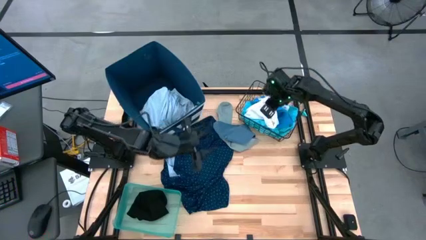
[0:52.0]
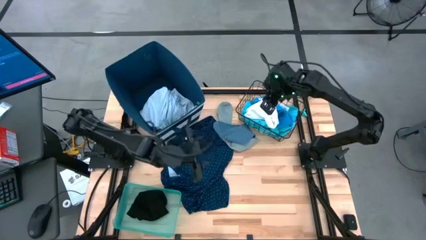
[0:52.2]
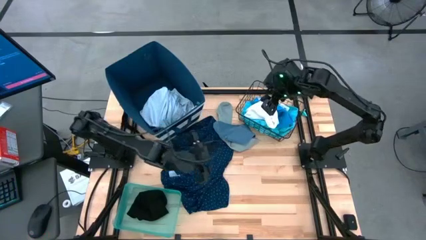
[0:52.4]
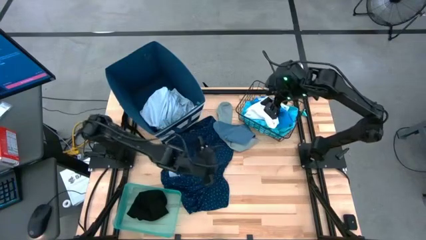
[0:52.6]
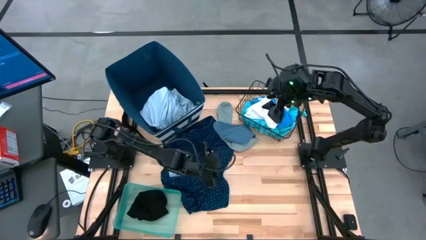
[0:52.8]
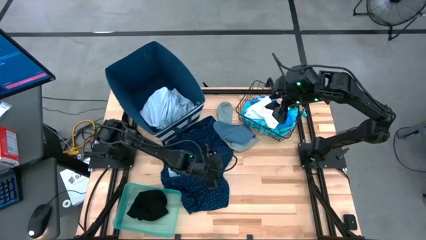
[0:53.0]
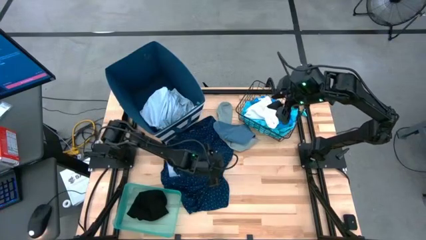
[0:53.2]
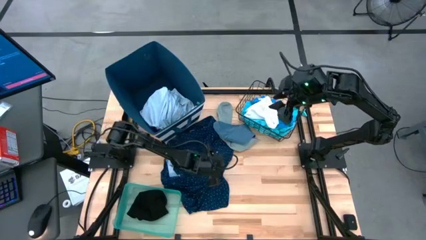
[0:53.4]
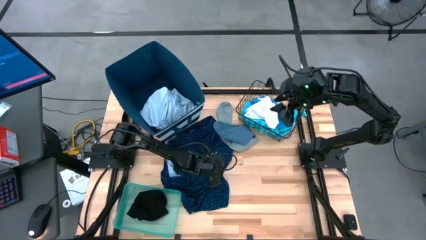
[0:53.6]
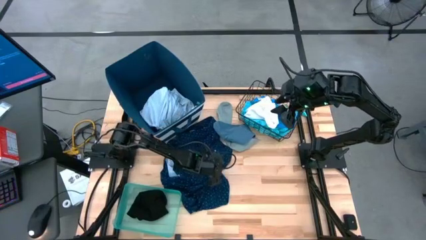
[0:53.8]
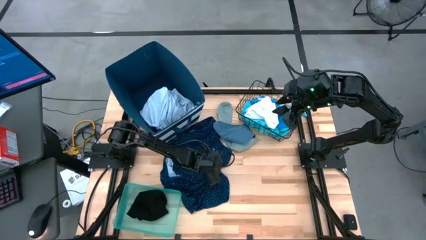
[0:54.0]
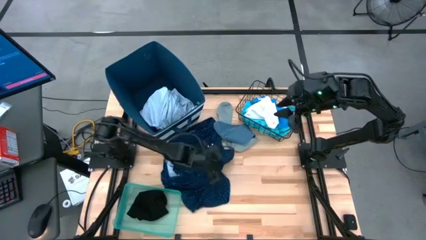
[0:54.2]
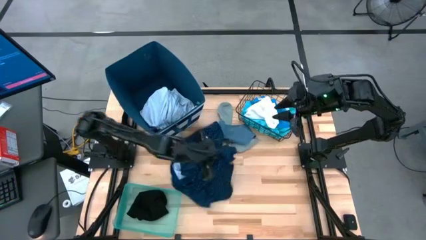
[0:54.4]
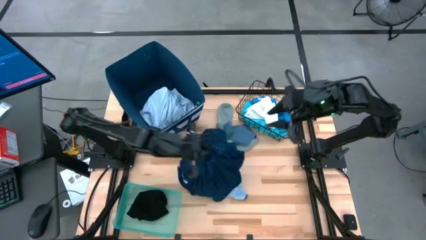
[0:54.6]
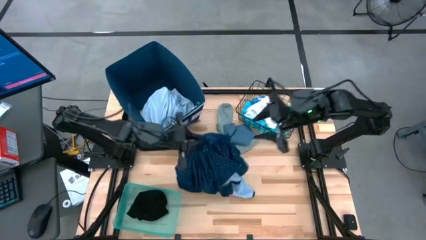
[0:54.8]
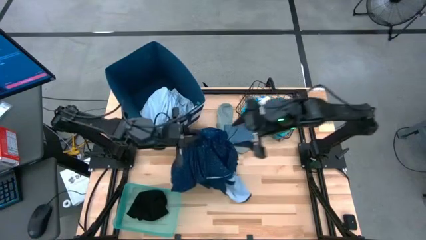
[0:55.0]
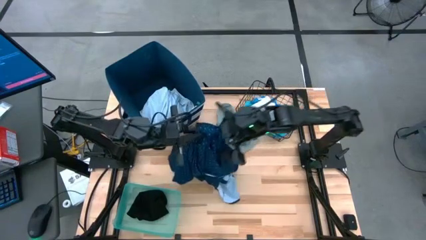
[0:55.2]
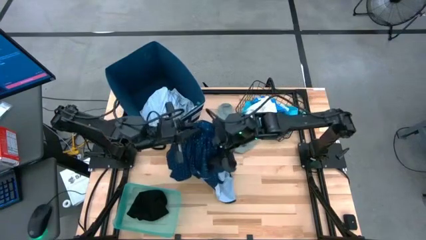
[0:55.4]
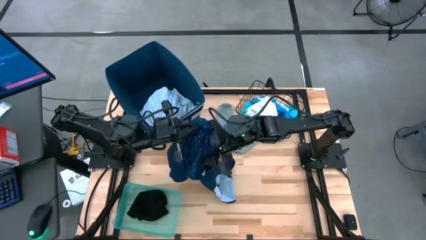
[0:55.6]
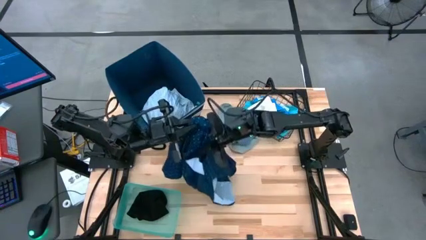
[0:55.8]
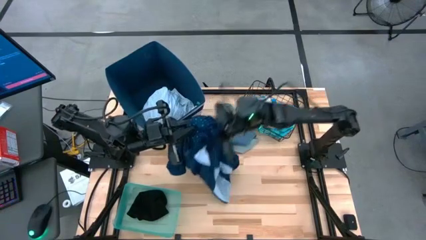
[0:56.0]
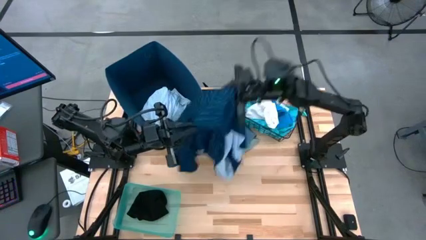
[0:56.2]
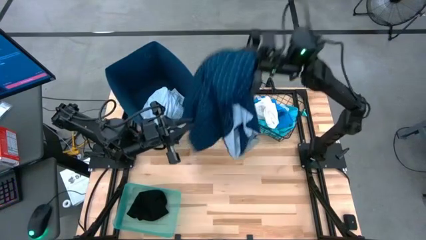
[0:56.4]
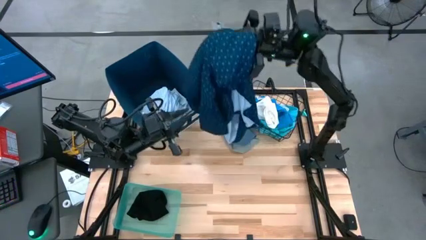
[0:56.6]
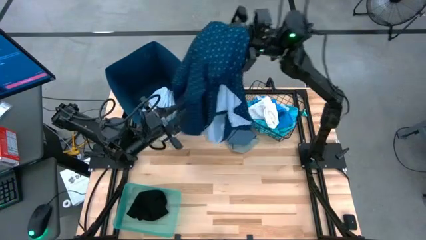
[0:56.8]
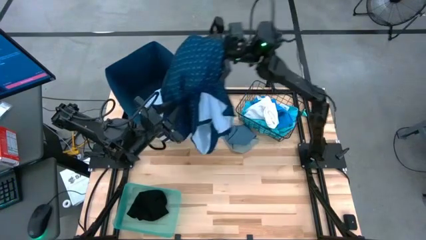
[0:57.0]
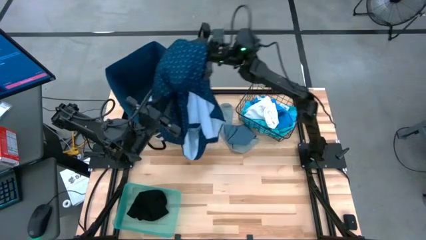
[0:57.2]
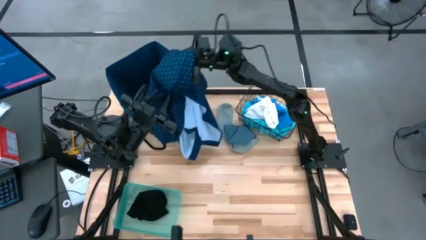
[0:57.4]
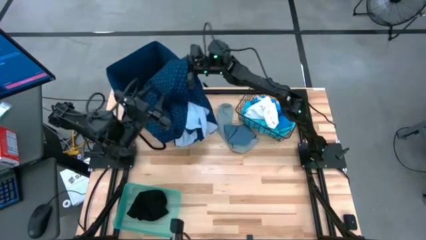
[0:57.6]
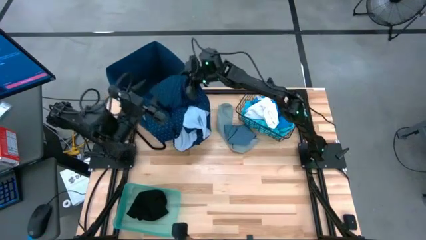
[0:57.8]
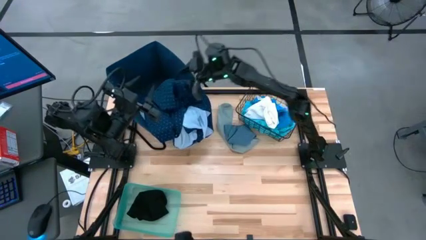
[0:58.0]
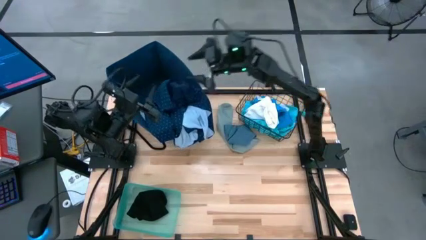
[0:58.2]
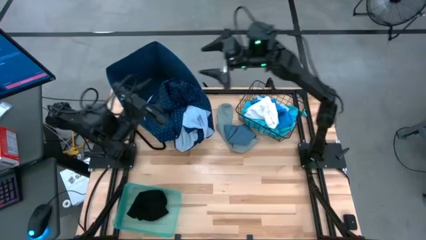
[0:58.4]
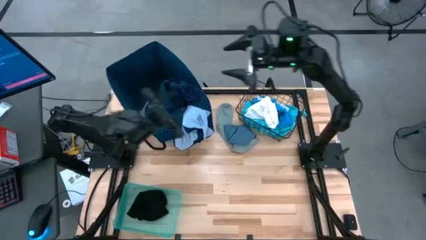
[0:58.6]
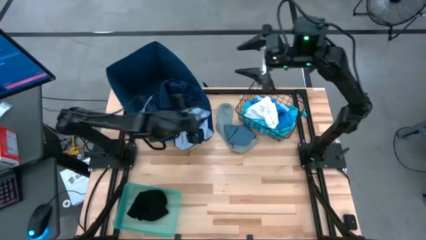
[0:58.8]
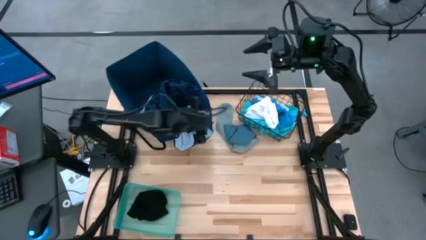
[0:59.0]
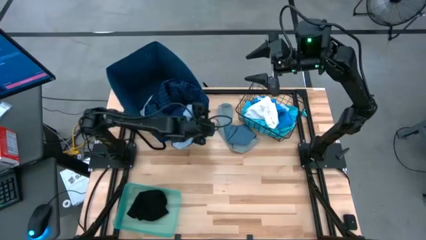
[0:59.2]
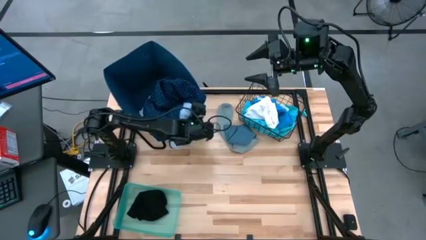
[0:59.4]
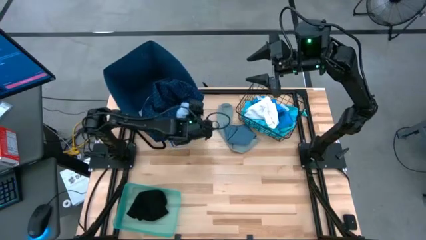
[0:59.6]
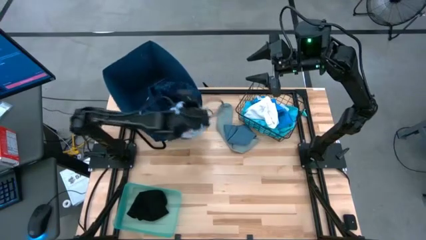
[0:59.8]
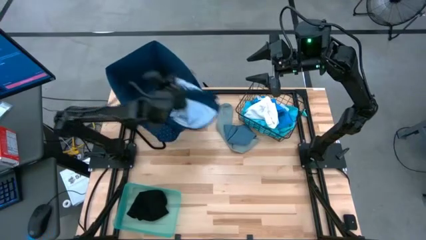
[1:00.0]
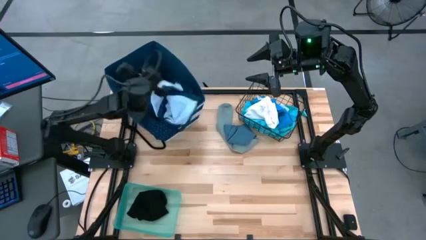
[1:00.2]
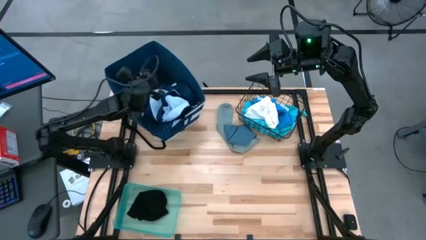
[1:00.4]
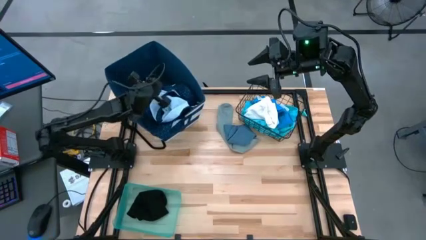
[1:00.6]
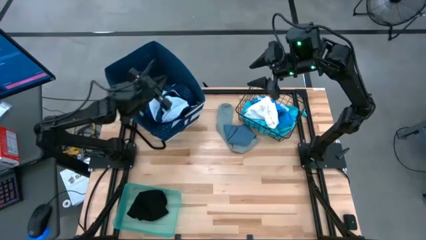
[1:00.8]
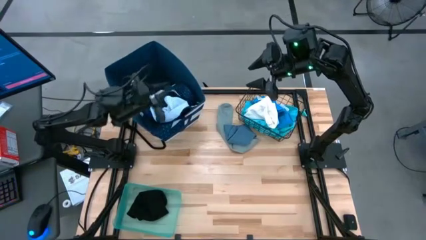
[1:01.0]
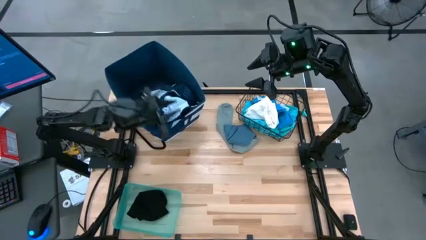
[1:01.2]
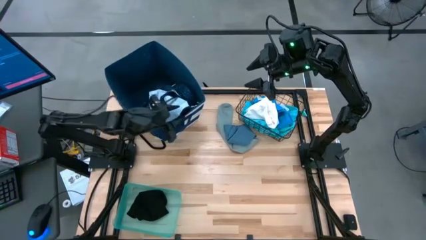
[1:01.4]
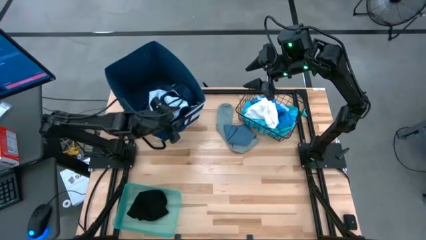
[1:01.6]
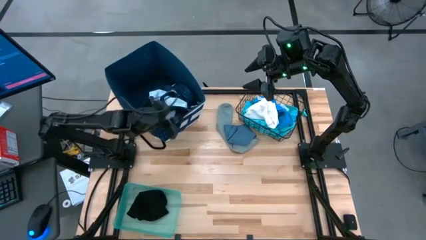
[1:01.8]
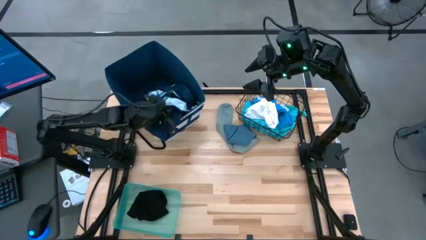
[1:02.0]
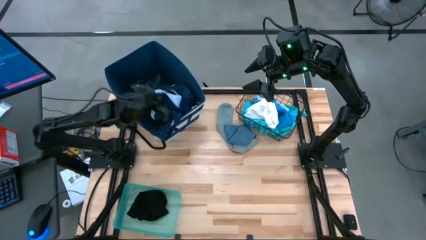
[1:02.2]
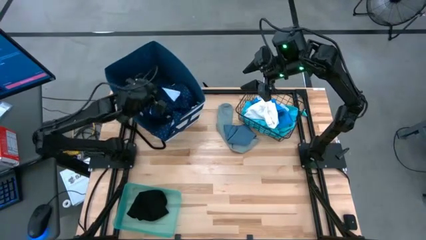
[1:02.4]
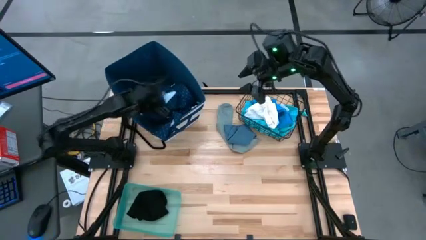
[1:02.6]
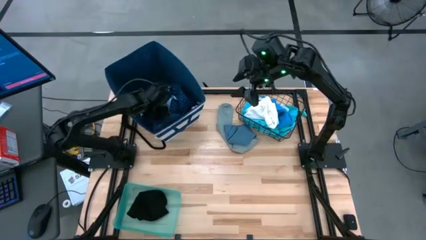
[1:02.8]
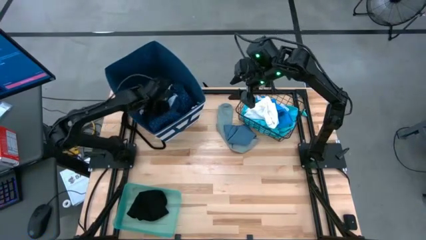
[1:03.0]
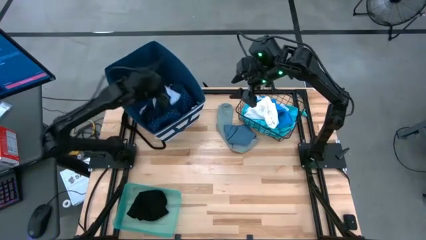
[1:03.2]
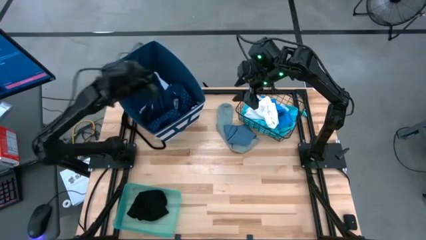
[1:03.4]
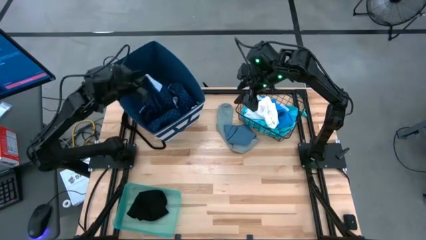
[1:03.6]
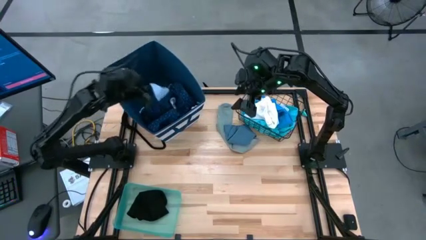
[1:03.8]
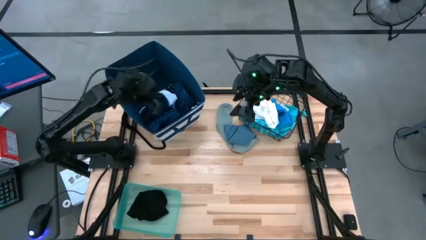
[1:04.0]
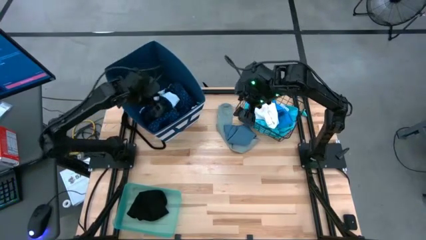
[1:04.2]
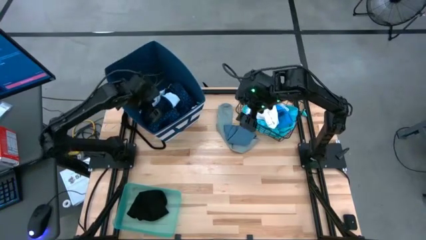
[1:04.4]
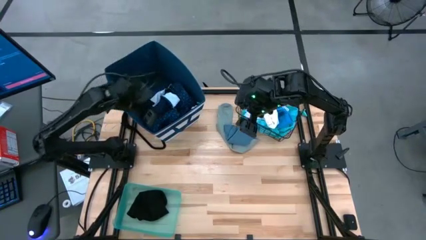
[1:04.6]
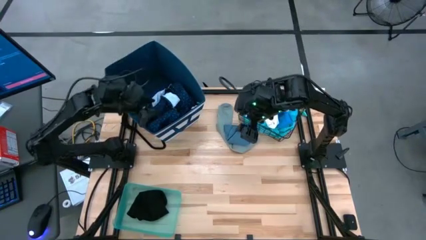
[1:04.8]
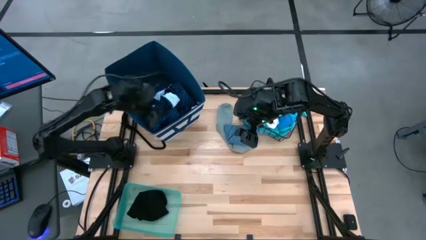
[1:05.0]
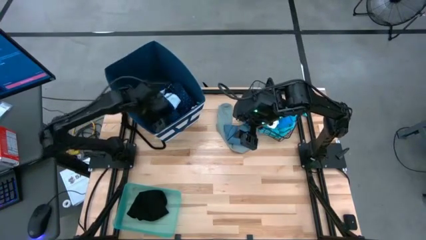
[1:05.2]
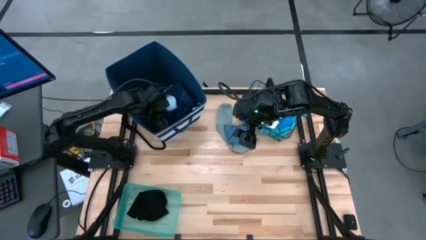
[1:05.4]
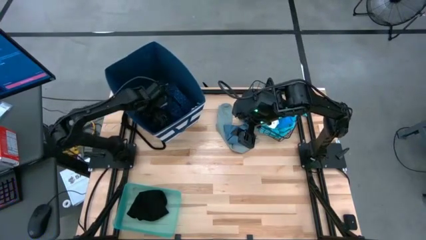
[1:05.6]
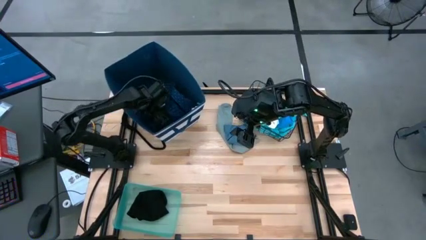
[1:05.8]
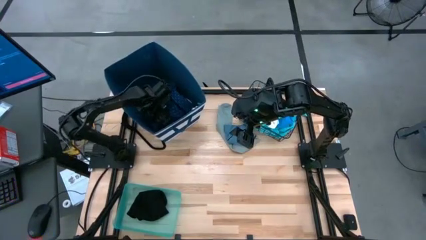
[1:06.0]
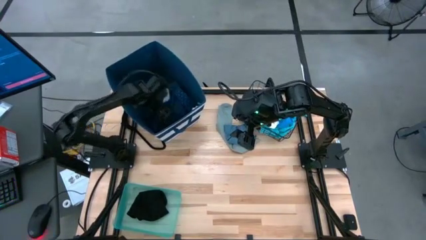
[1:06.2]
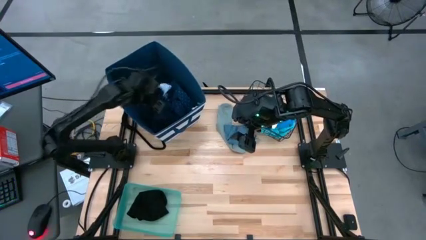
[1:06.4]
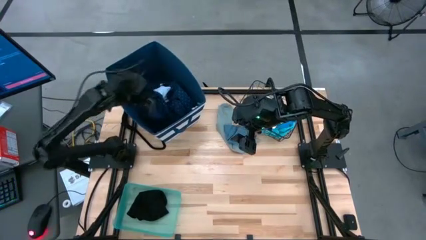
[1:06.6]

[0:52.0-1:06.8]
Task: Pick & Place Cloths
Put the dark blue cloth into the blue laundry organizer

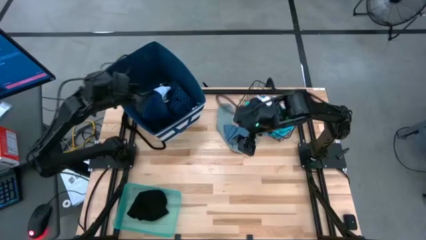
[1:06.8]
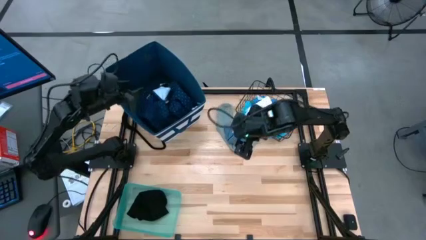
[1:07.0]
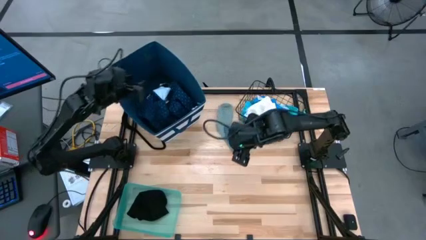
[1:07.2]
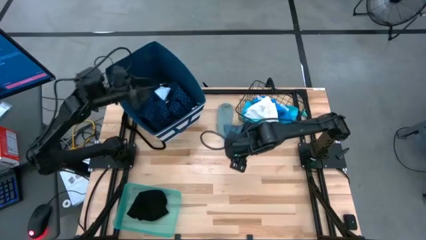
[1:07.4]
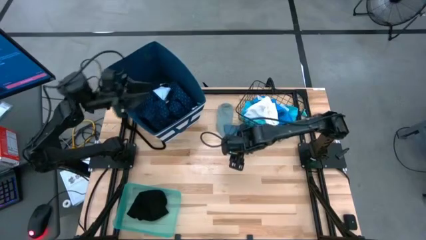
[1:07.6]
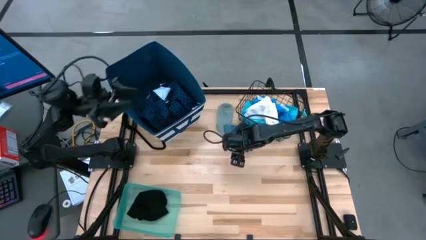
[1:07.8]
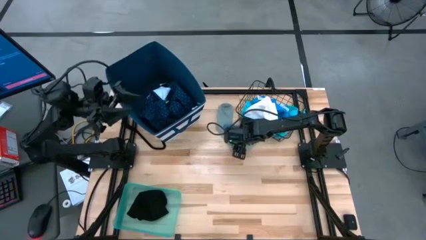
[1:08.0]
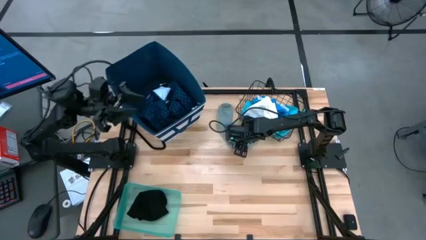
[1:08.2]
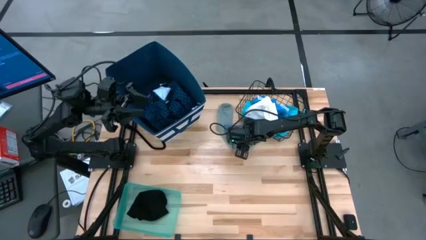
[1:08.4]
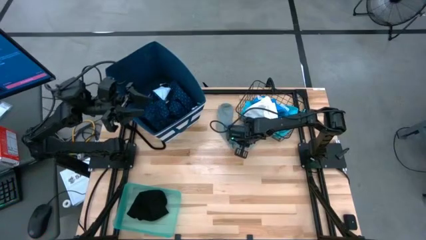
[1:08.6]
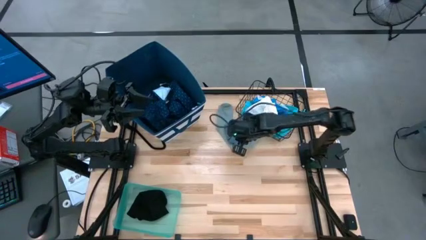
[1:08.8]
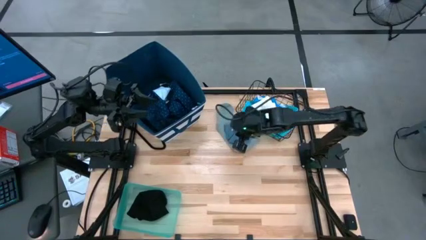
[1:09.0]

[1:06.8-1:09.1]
Put the gray sock into the blue bin
